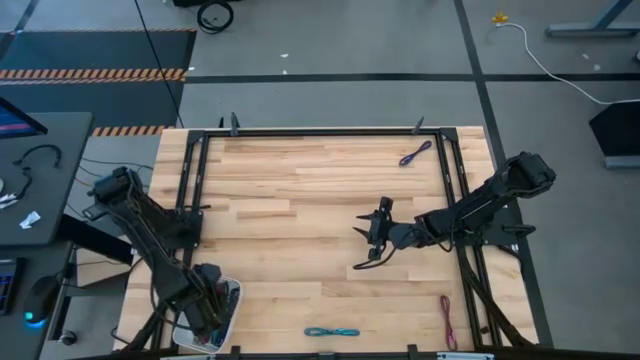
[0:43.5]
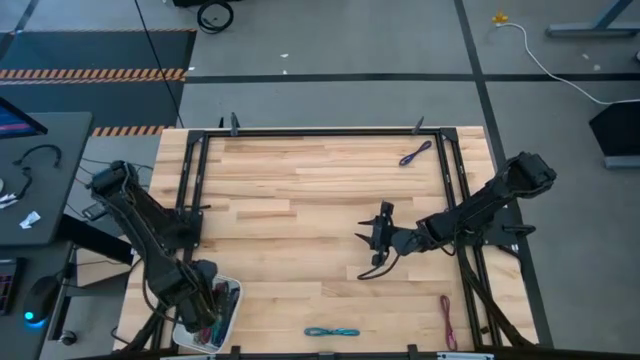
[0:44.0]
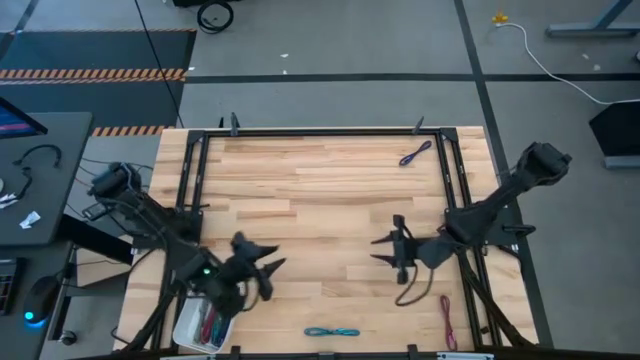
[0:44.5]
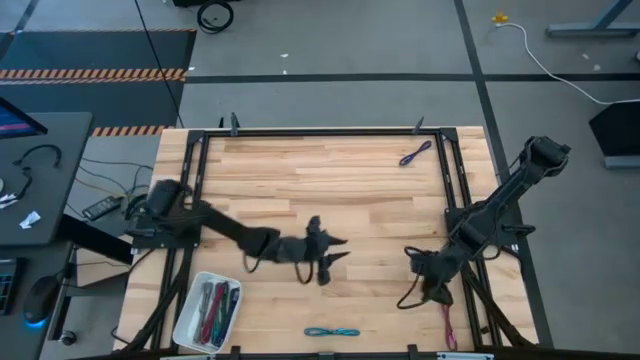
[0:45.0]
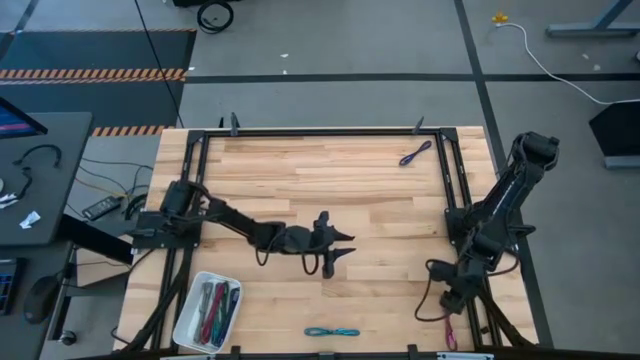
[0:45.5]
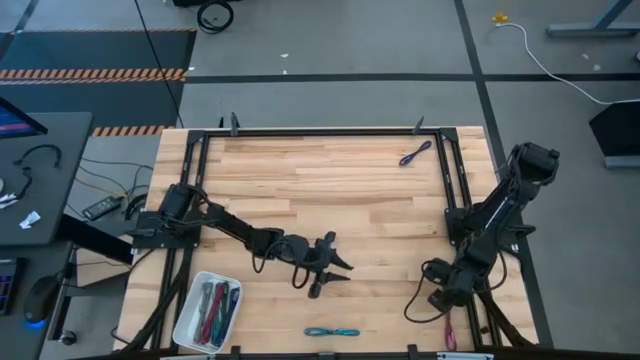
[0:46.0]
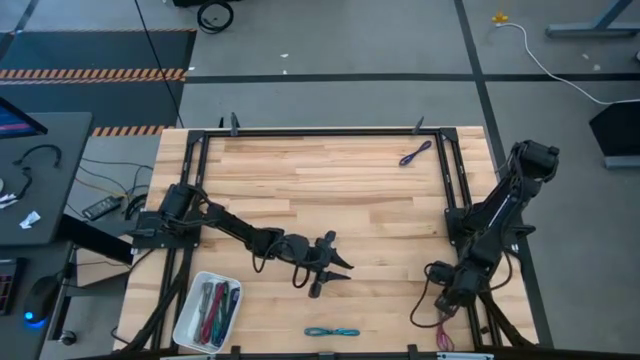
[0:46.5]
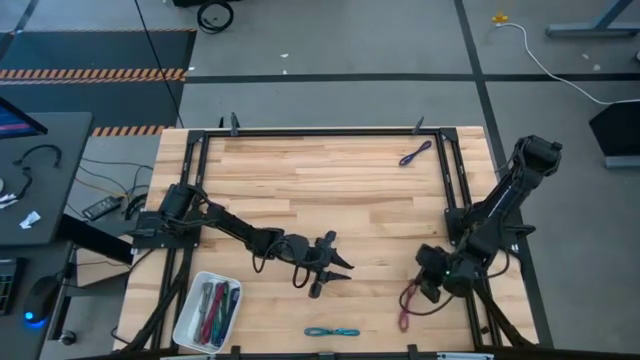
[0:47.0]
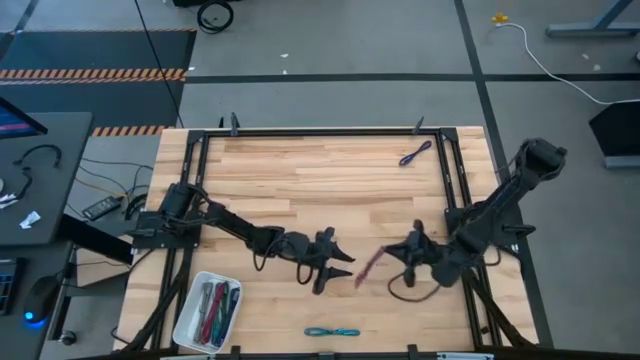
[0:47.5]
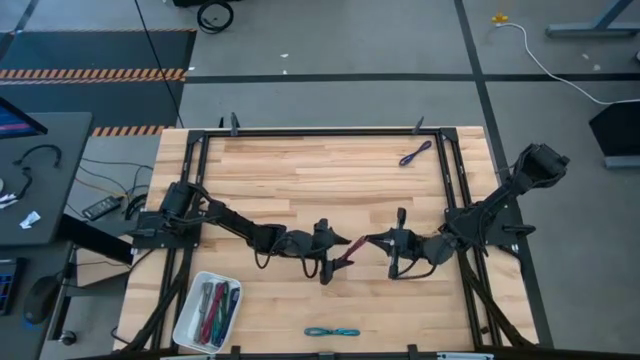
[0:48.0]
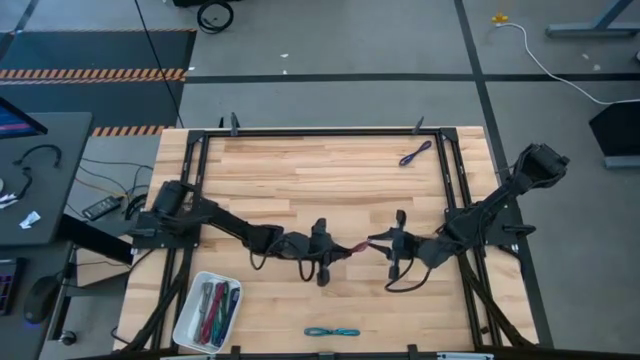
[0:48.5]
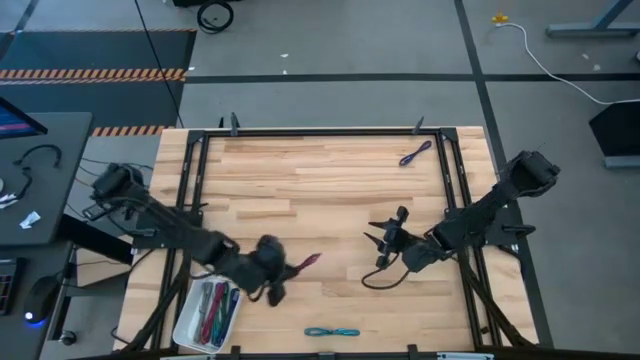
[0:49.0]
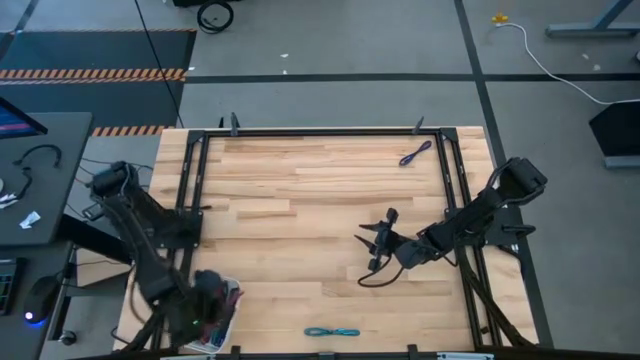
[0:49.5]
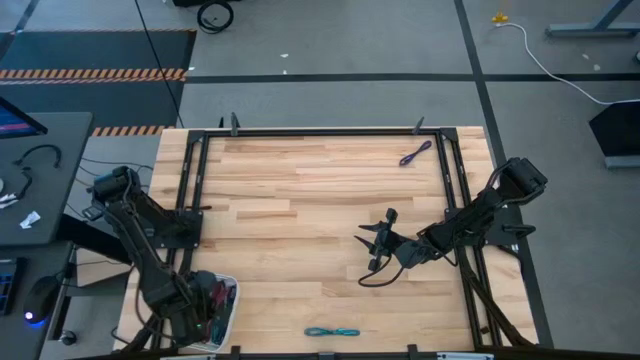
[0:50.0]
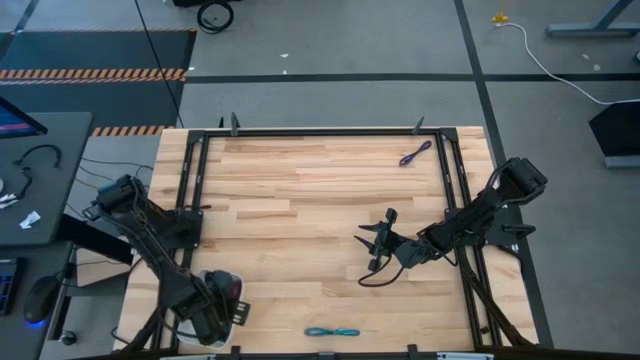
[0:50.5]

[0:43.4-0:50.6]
Task: Pick and place USB-C Cables
Put the pink charger cable into the white bin

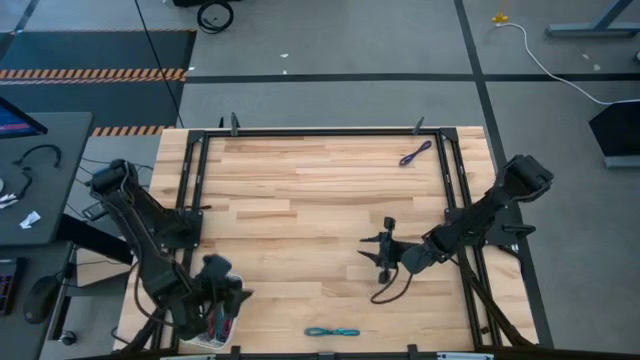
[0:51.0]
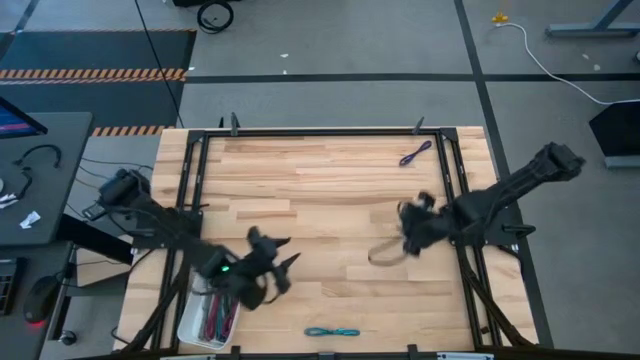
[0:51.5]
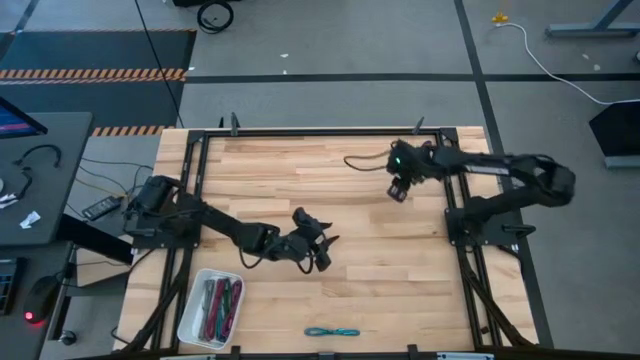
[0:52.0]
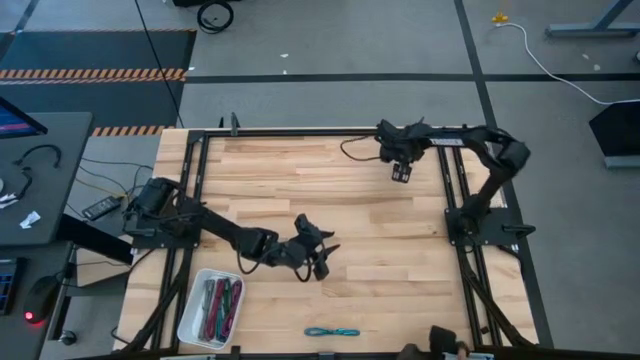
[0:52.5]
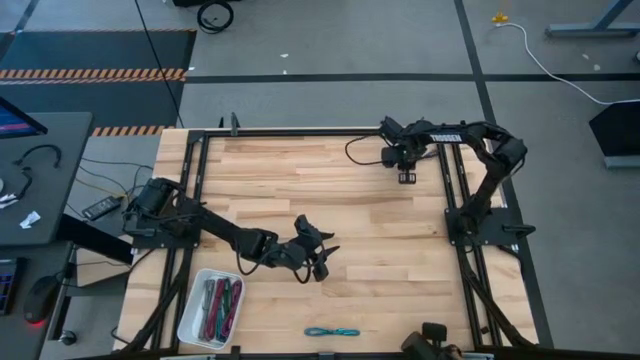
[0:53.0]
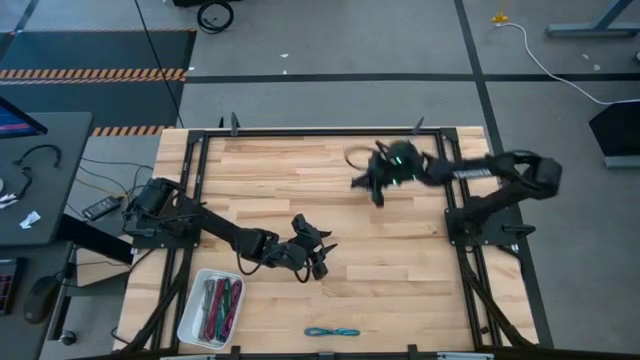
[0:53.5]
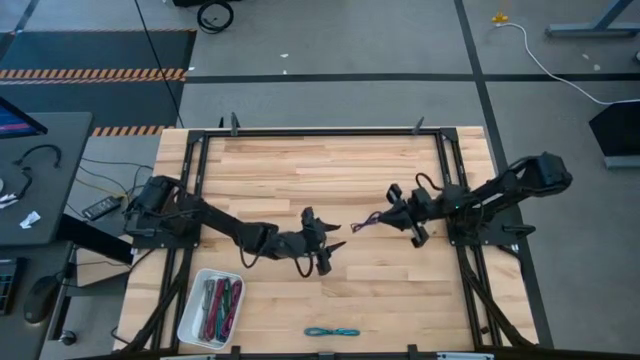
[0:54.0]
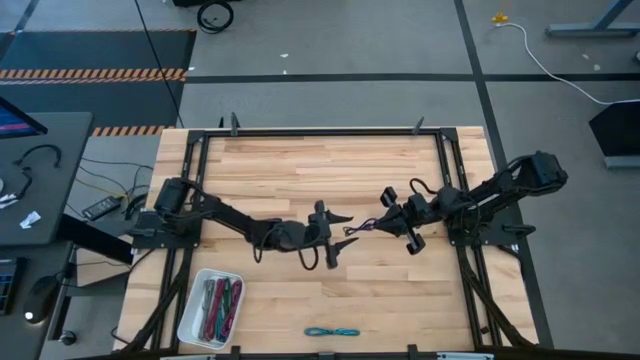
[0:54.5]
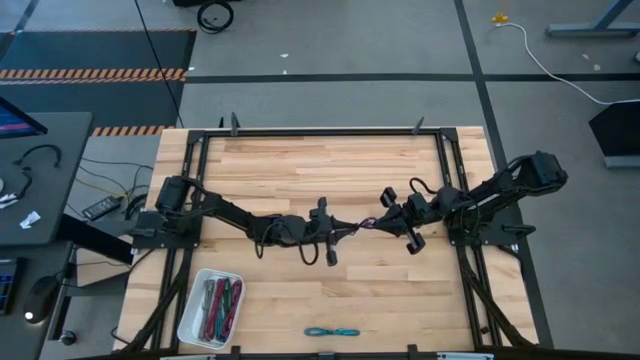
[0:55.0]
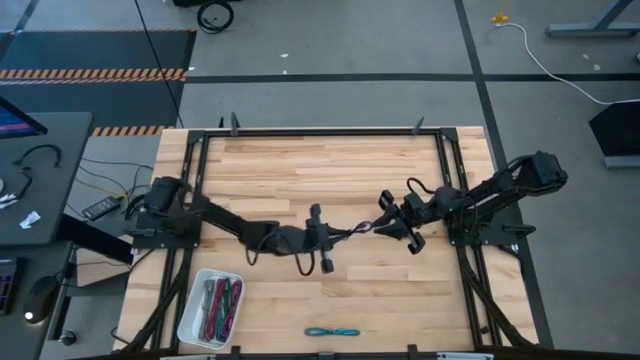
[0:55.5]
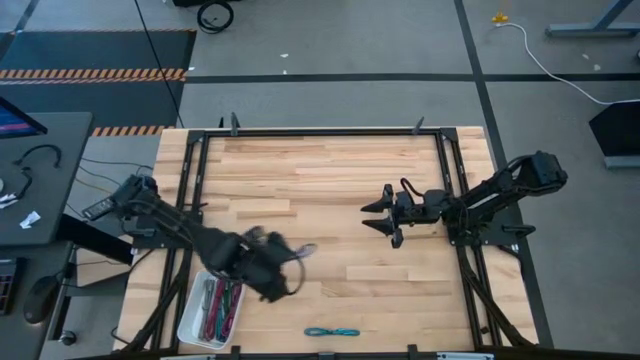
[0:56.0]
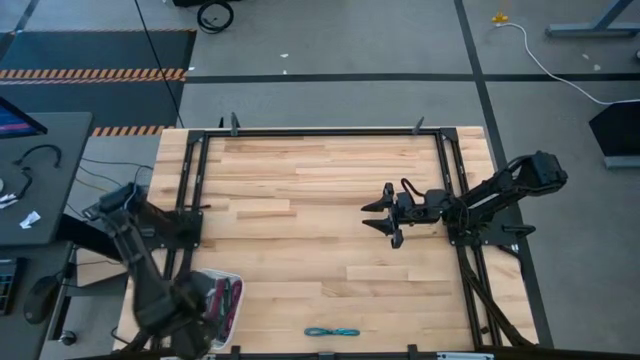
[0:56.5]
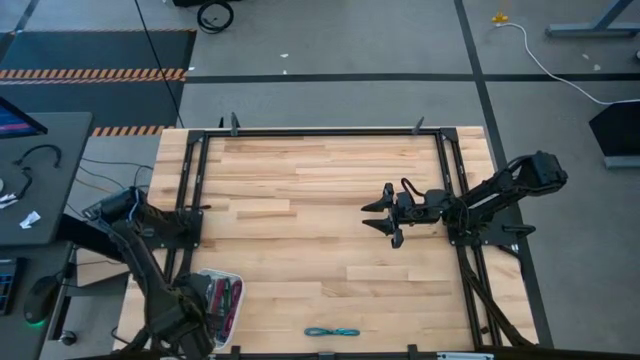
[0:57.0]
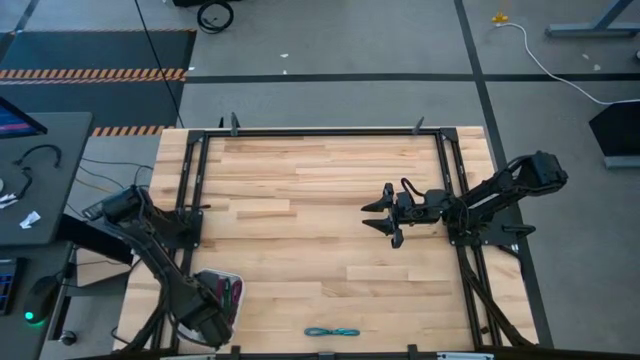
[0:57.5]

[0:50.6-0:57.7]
Put the purple charger cable into the white bin

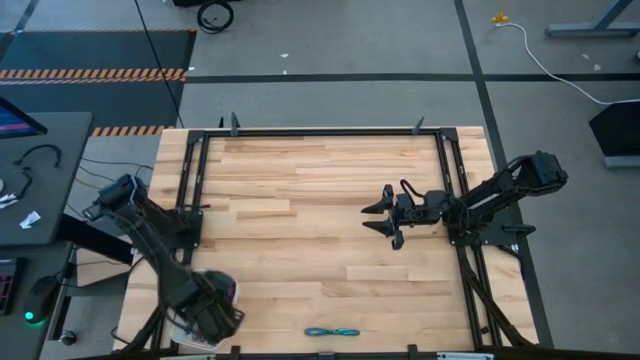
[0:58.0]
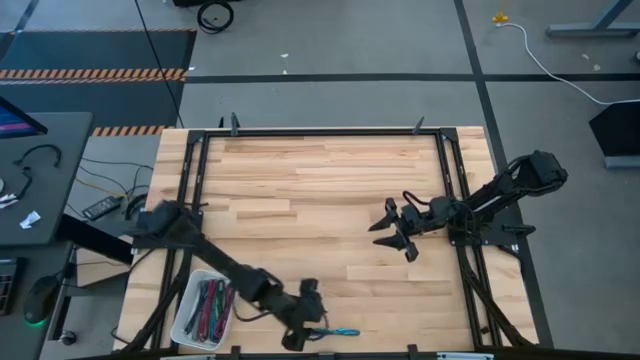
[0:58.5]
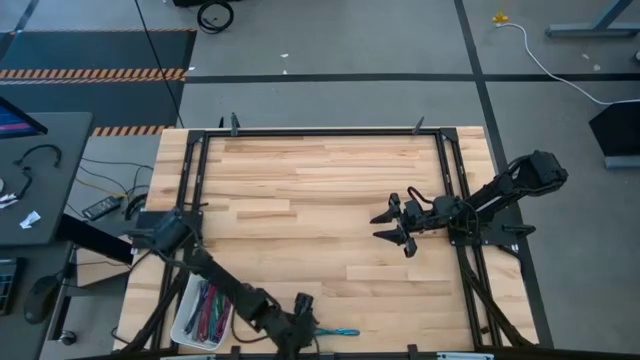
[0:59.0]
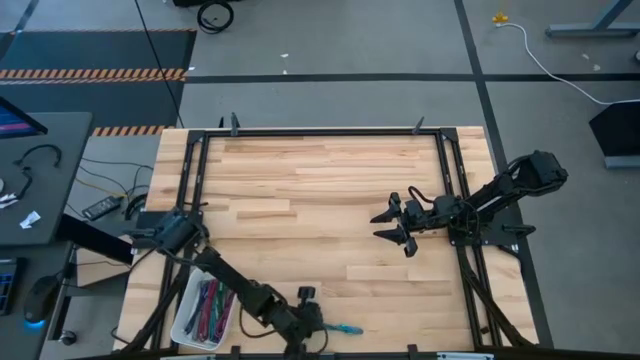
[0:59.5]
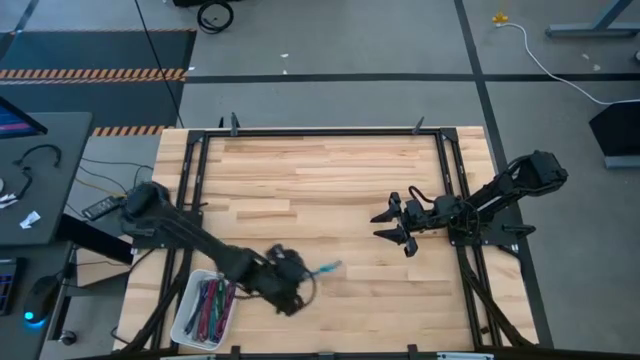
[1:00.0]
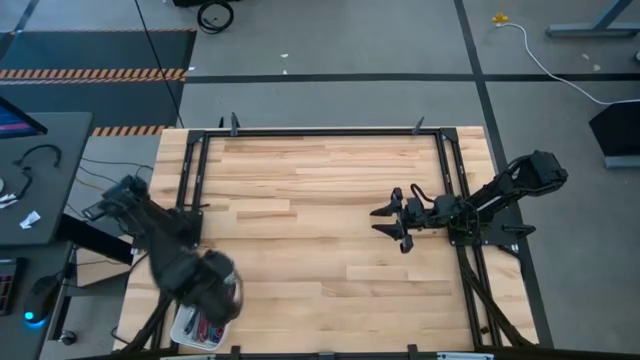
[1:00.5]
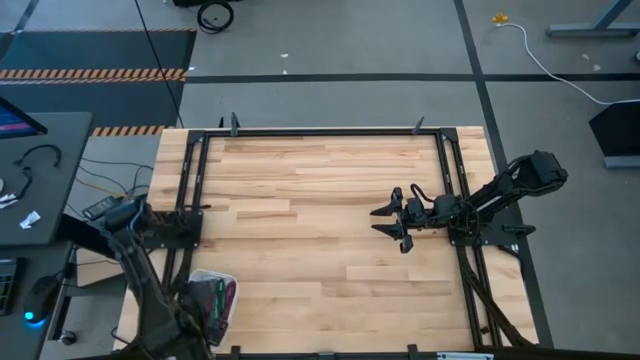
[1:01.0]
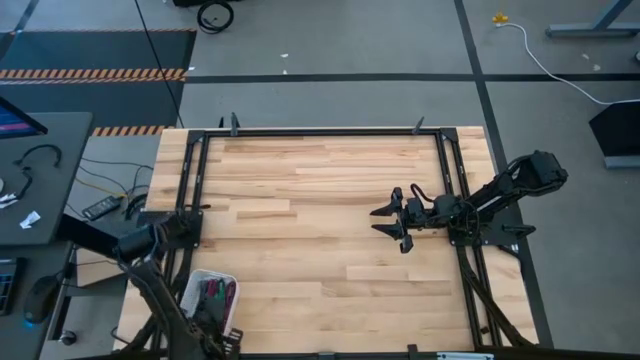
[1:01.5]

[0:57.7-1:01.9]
Put the light blue charger cable into the white bin
